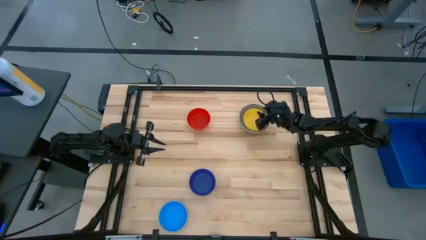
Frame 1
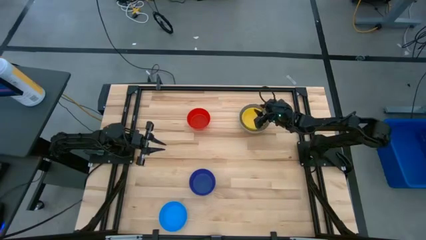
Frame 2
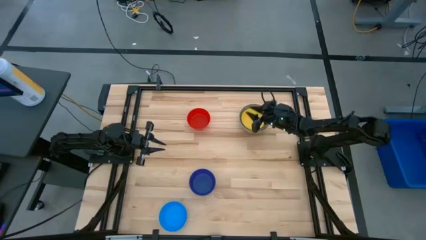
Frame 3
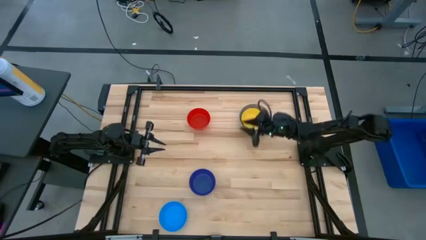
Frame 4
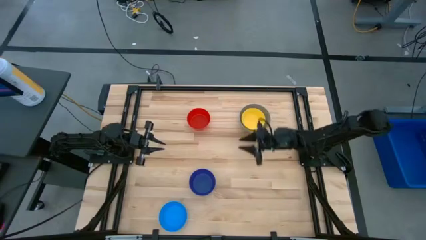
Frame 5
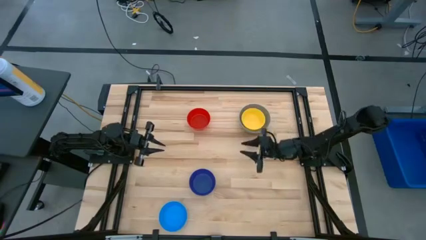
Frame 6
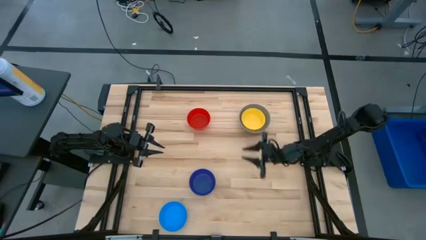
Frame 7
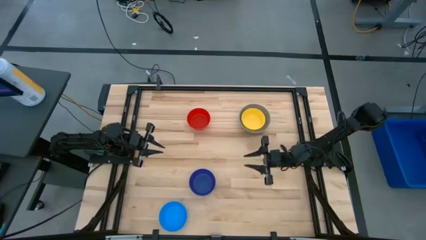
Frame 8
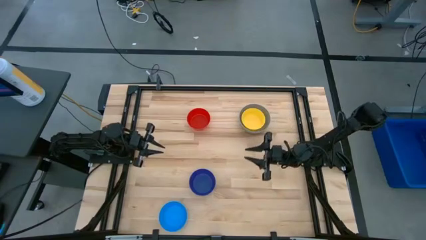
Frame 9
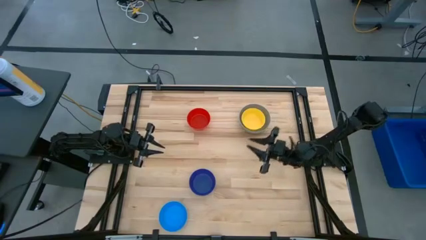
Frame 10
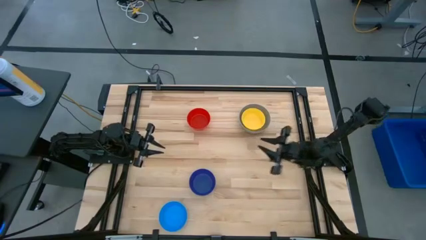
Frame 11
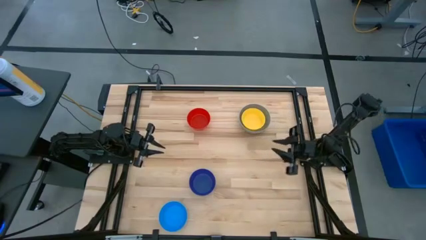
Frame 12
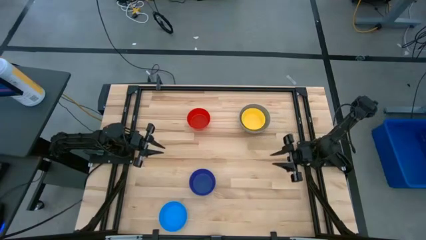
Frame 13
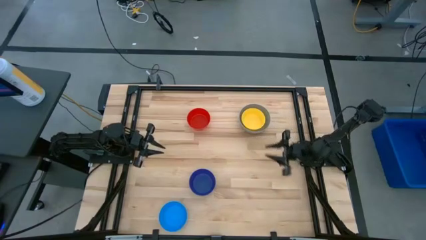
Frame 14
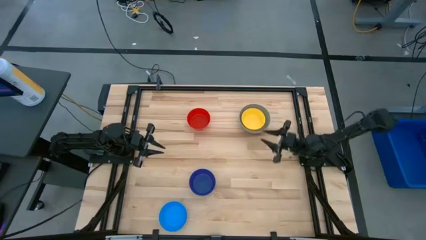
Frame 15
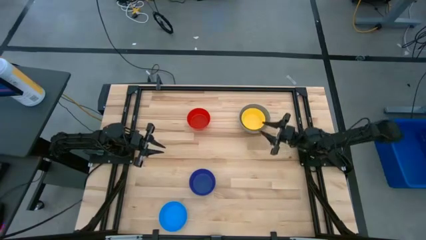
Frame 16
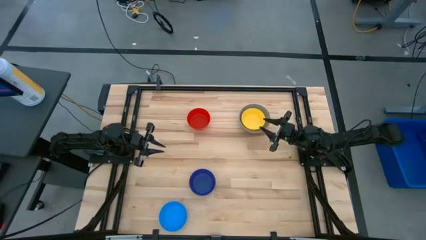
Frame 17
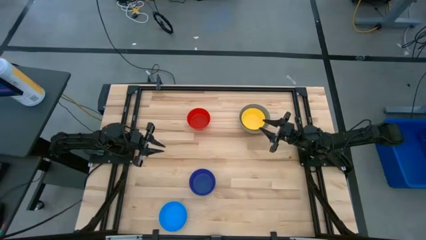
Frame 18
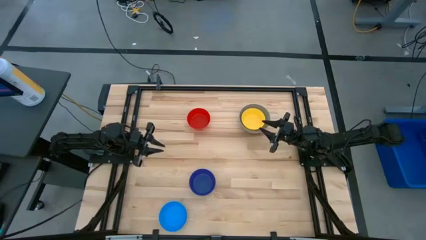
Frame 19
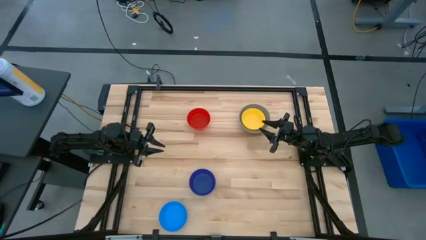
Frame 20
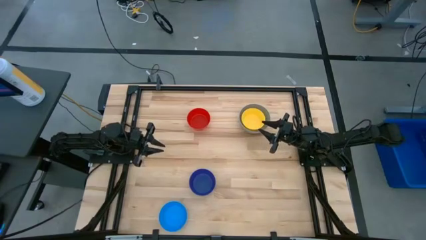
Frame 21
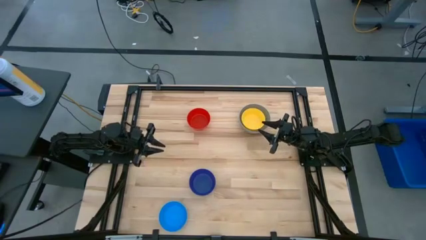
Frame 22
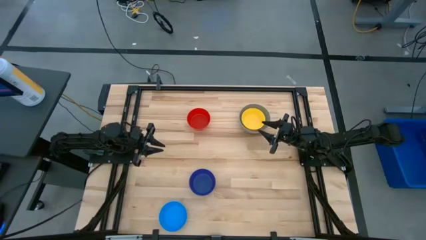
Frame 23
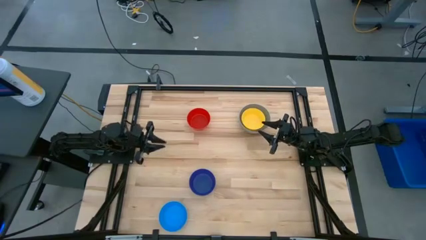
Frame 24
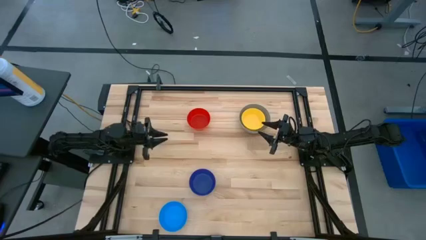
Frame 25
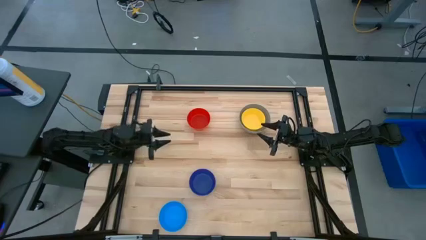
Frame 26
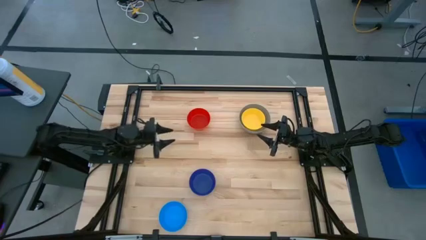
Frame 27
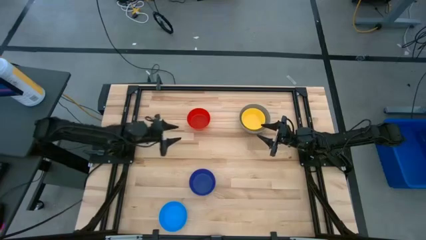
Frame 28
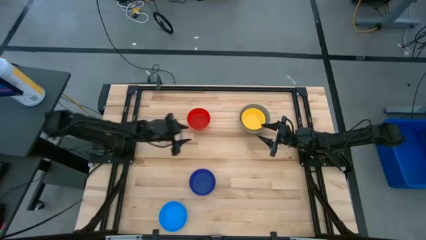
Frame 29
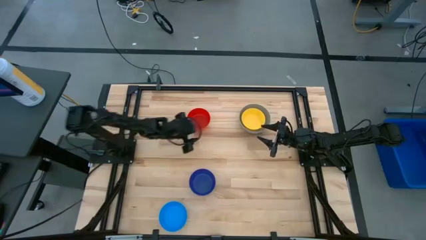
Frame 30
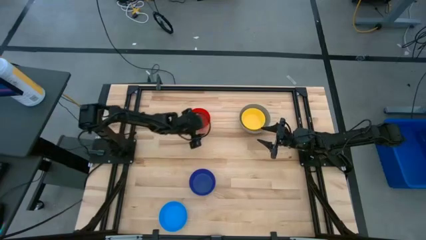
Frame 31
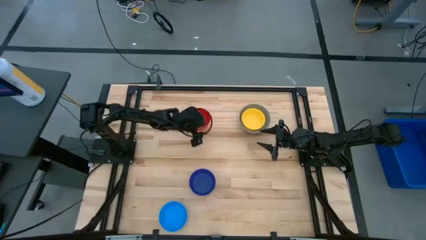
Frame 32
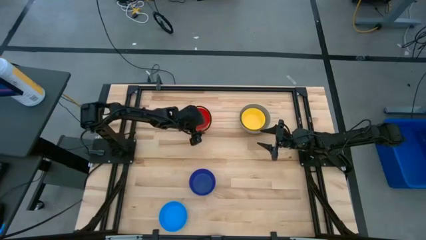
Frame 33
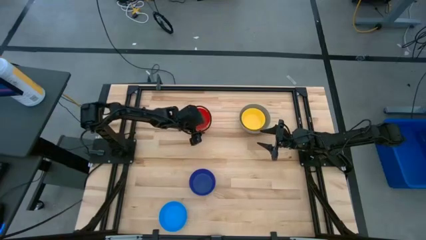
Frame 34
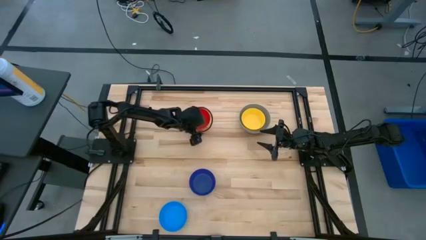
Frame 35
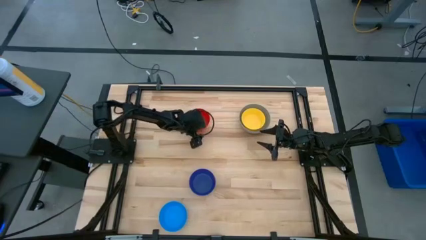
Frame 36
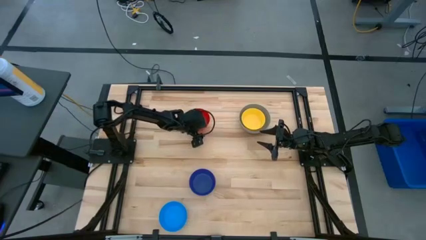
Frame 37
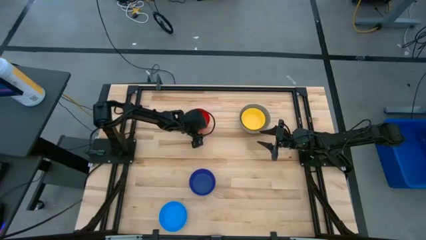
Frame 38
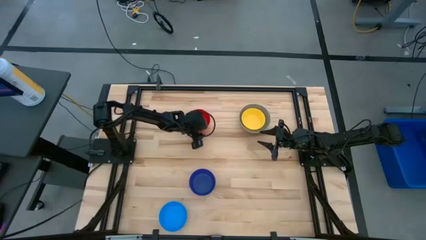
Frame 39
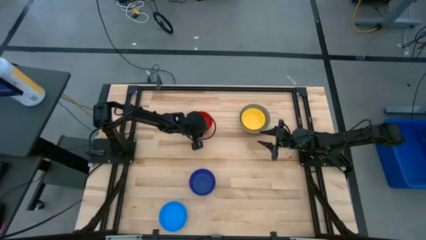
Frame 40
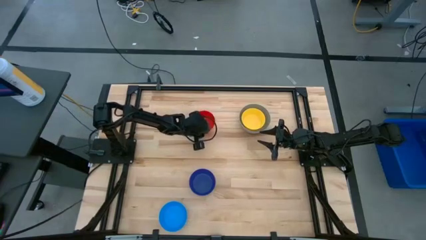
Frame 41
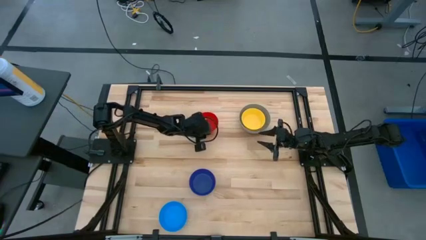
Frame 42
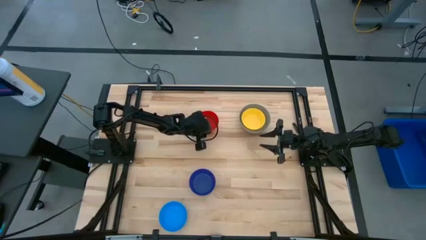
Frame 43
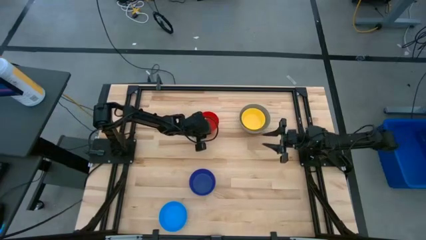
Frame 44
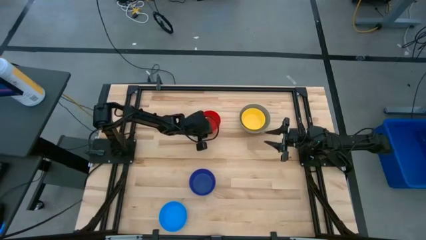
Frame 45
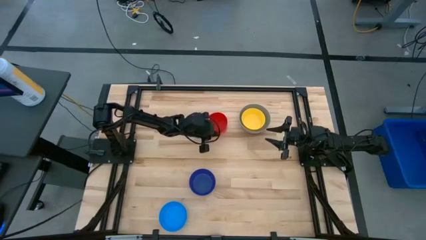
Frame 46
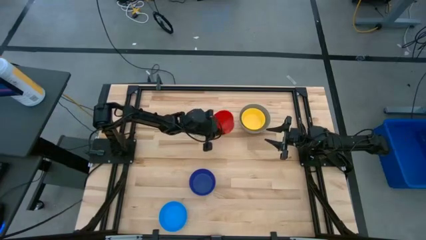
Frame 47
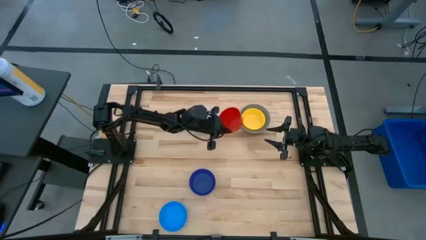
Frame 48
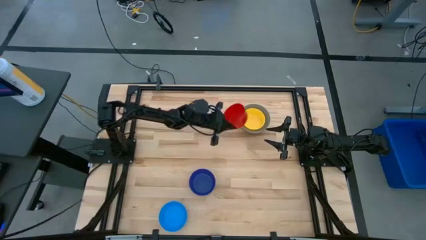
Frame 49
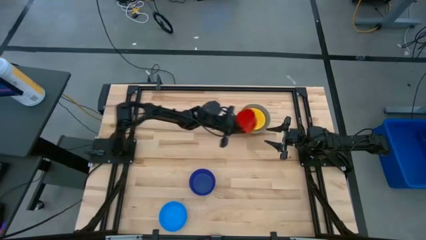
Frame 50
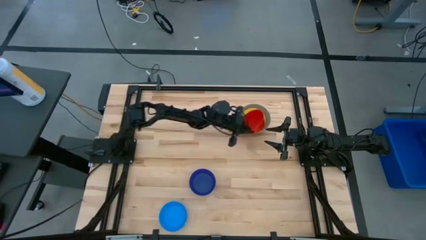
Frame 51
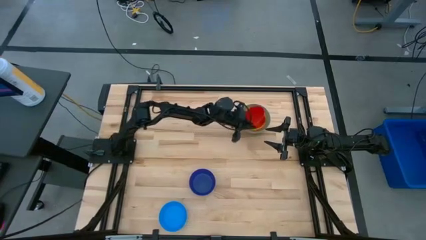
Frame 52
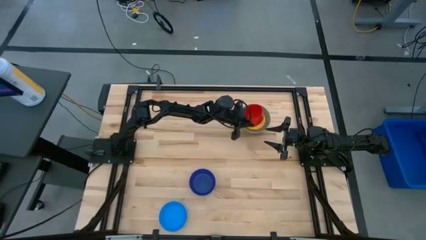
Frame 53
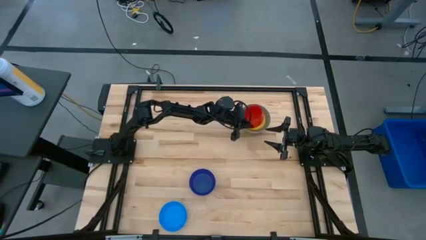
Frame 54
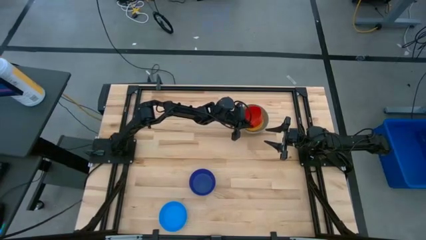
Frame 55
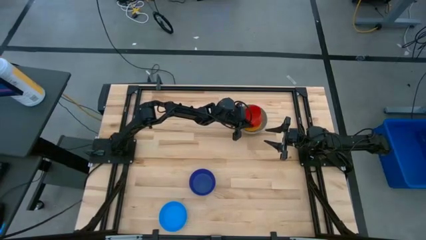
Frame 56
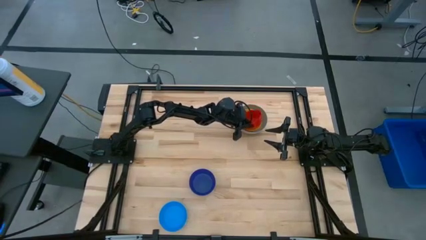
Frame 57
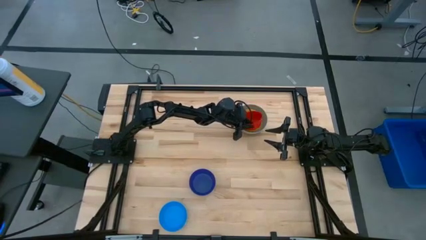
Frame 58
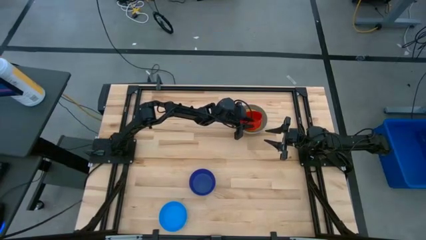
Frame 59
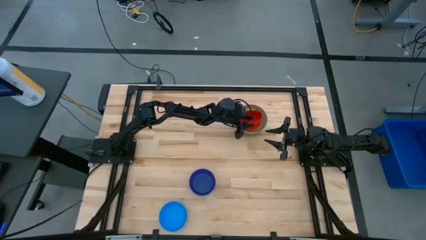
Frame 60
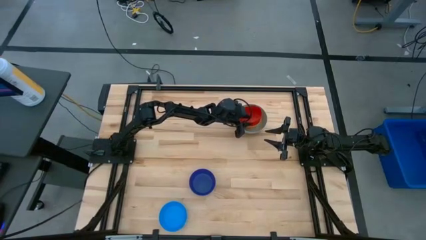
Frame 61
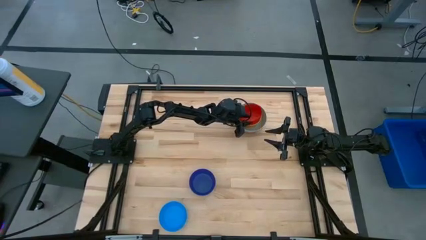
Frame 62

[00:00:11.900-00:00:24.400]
Stack the red bowl on top of the yellow bowl

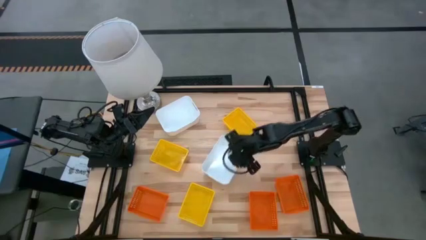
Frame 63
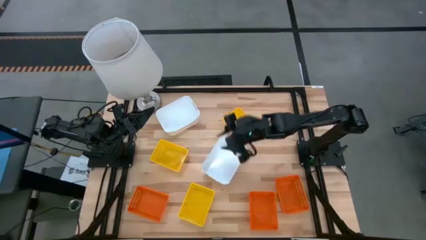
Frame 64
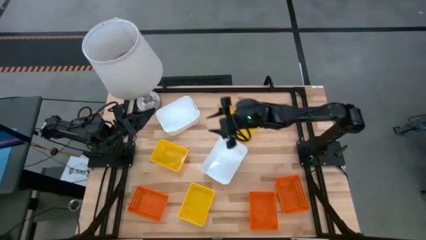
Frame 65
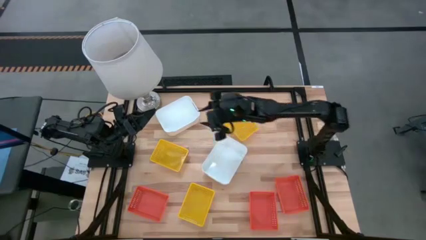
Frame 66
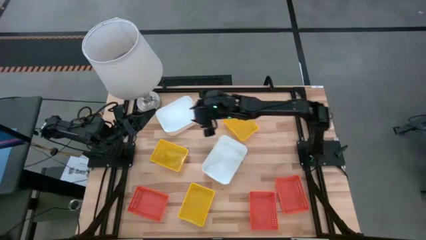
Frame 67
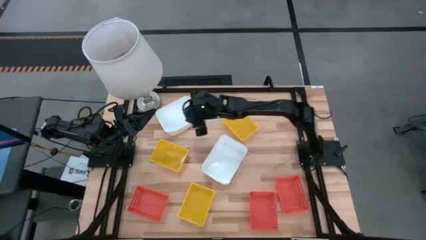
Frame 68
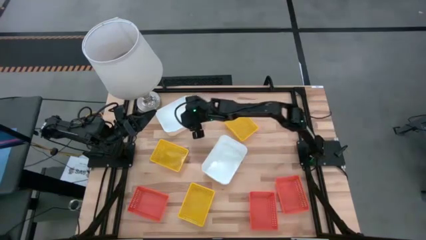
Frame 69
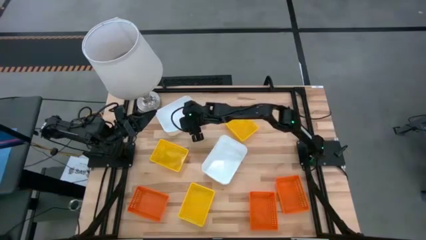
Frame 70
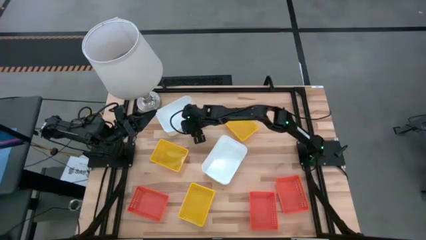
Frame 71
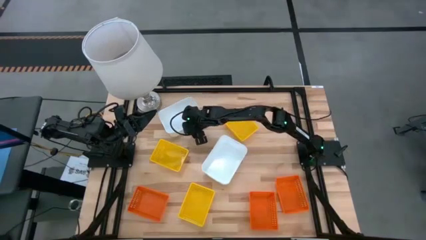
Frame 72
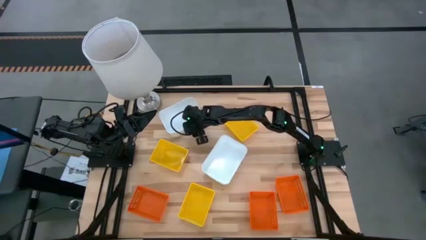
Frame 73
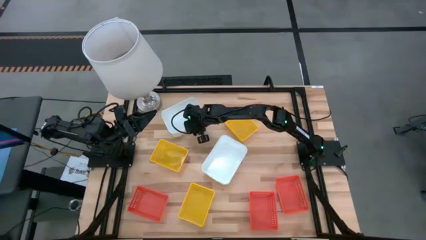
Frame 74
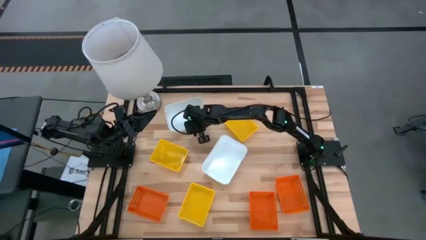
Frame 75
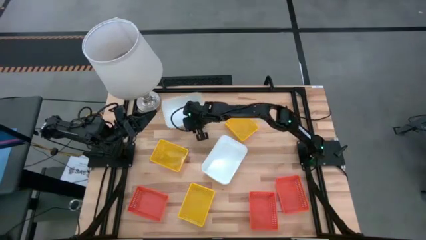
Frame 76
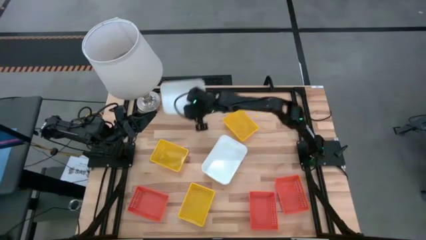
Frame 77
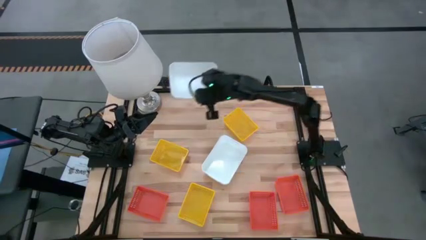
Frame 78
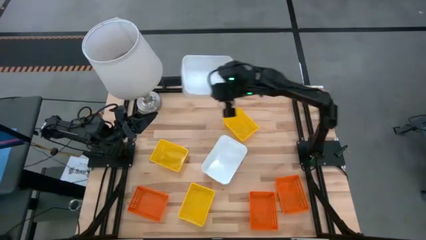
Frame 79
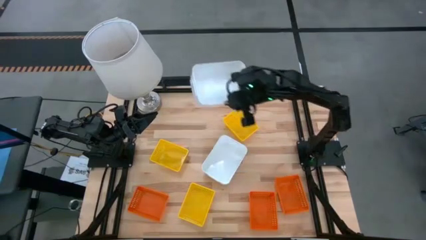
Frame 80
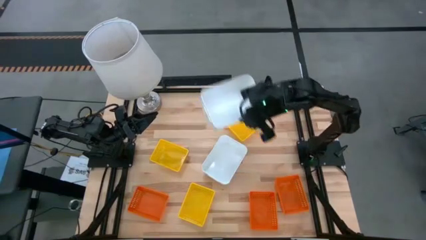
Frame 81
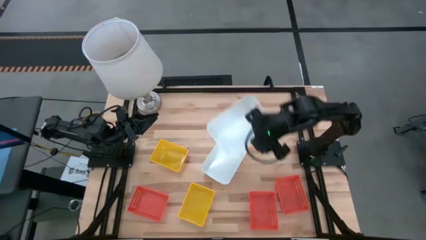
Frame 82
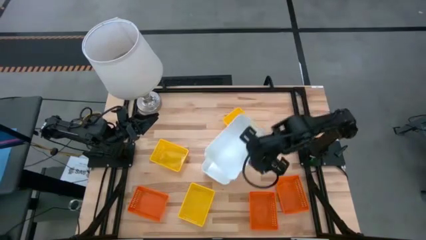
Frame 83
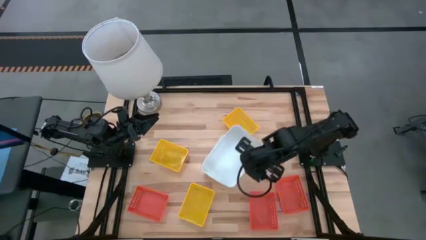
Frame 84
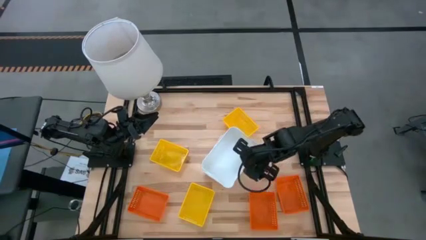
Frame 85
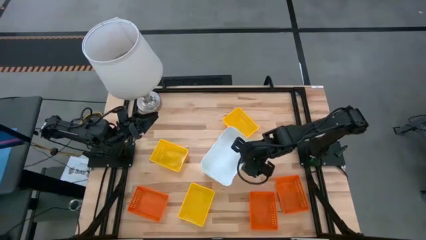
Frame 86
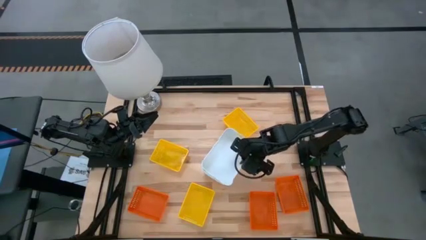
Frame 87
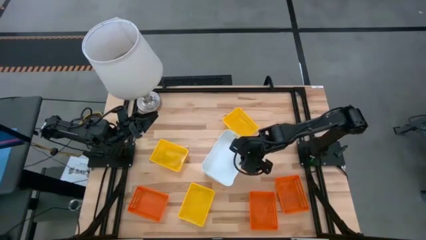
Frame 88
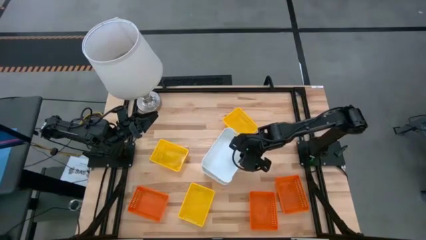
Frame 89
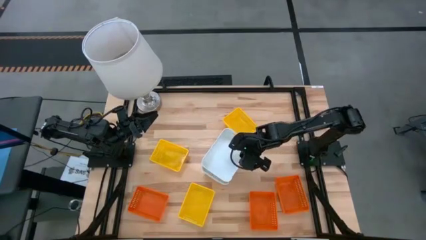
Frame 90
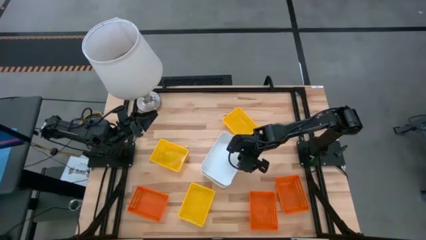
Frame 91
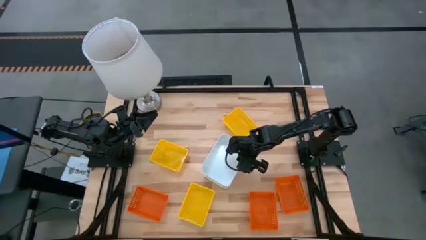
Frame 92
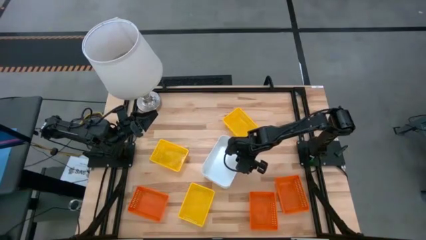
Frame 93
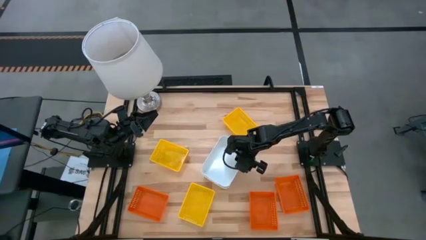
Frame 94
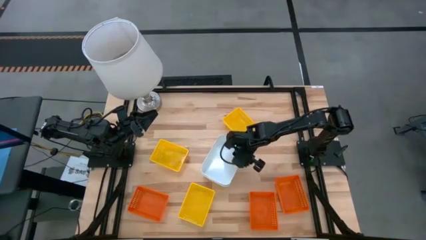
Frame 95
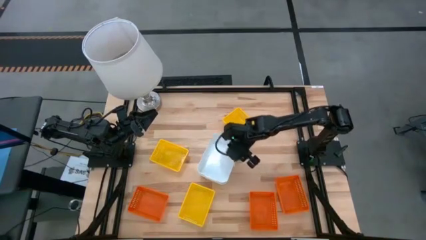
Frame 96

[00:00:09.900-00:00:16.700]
Stack the top white bin on the bottom white bins
